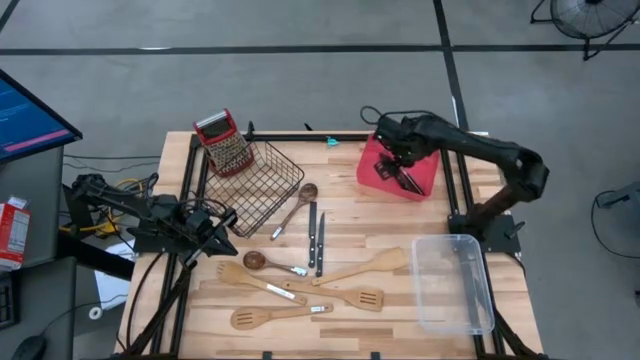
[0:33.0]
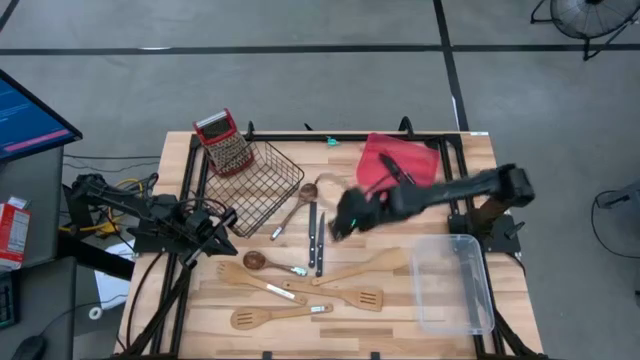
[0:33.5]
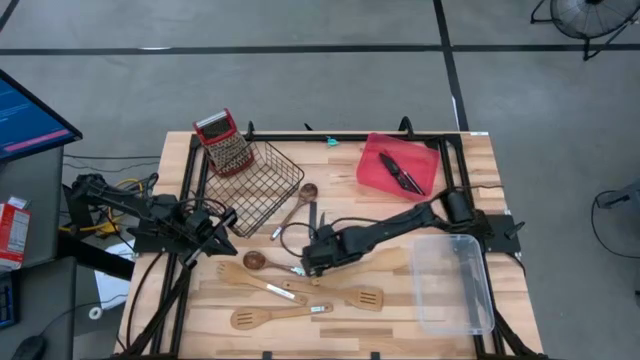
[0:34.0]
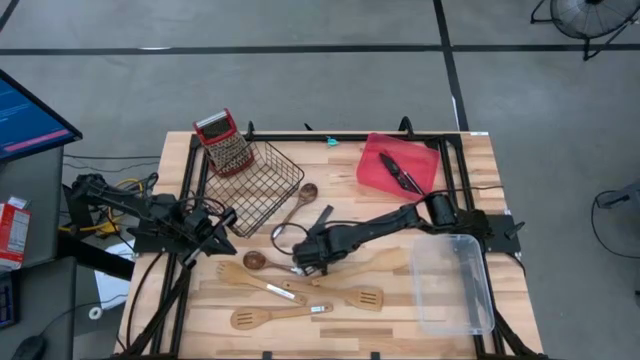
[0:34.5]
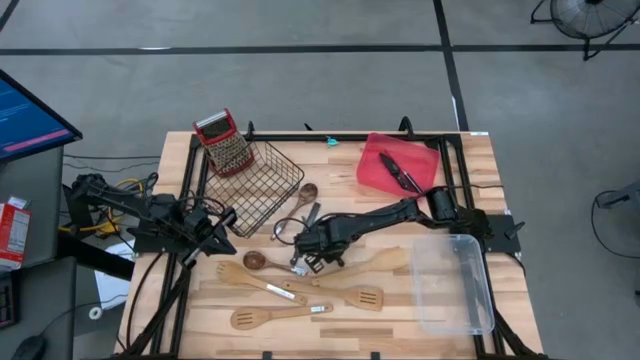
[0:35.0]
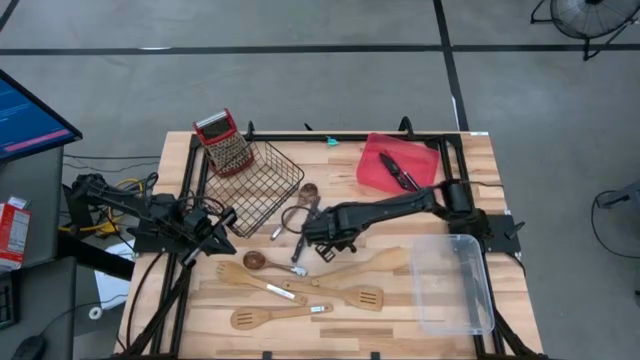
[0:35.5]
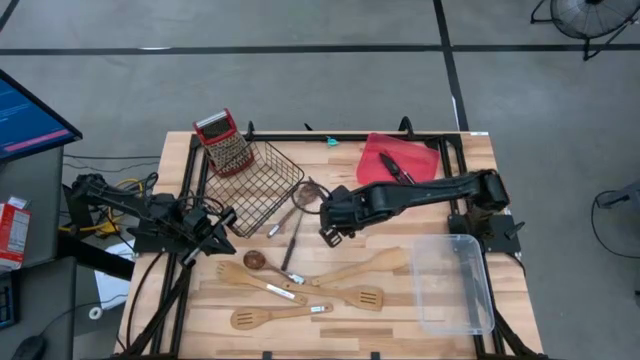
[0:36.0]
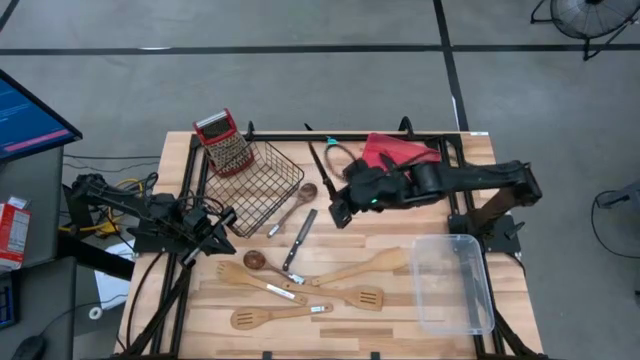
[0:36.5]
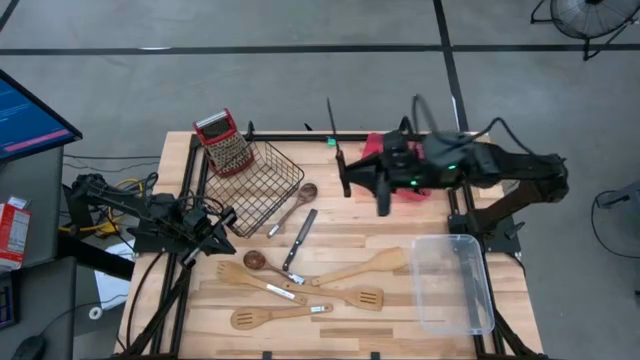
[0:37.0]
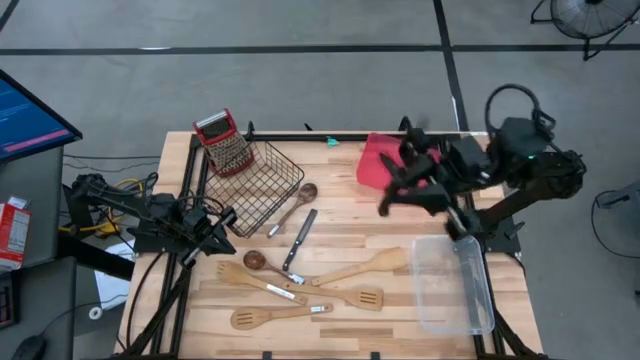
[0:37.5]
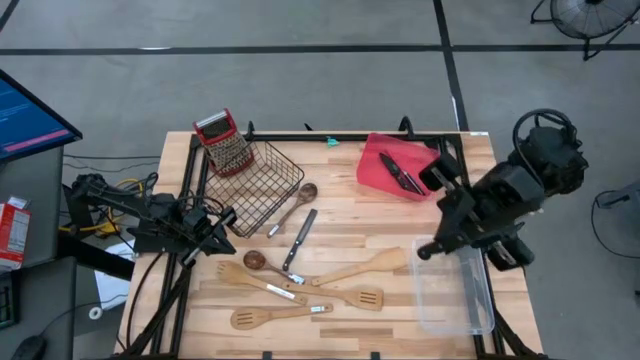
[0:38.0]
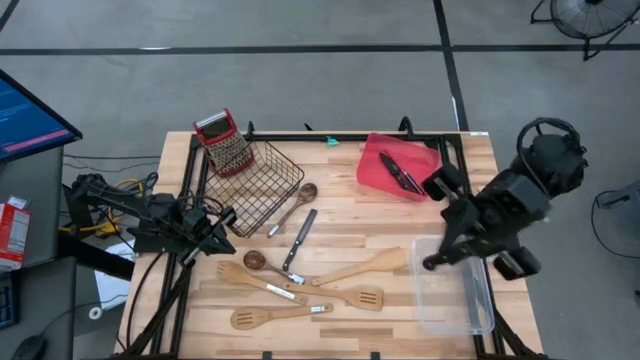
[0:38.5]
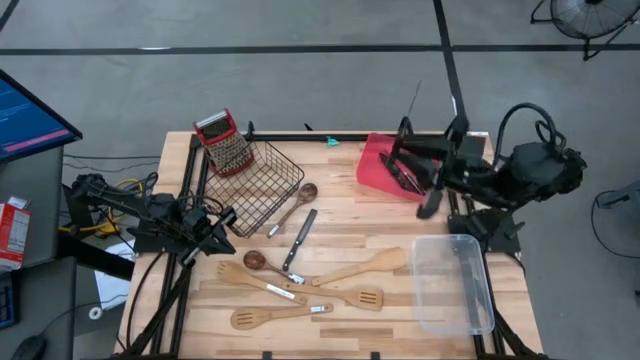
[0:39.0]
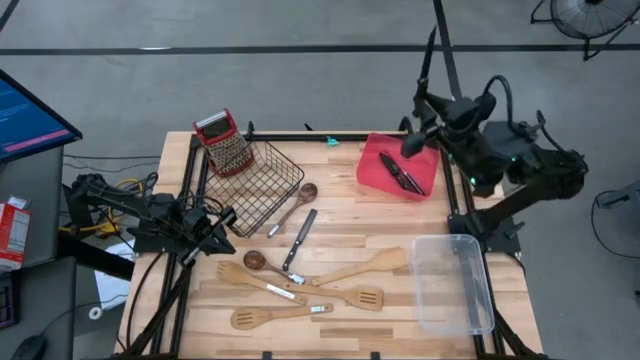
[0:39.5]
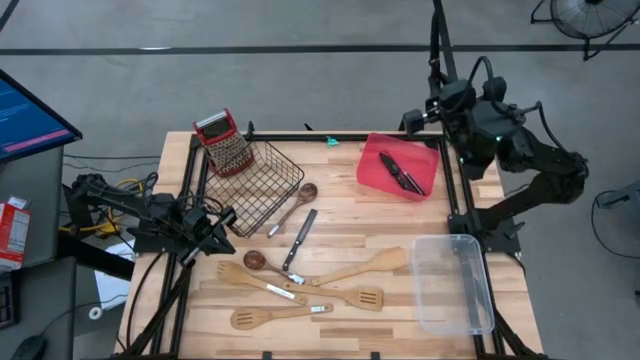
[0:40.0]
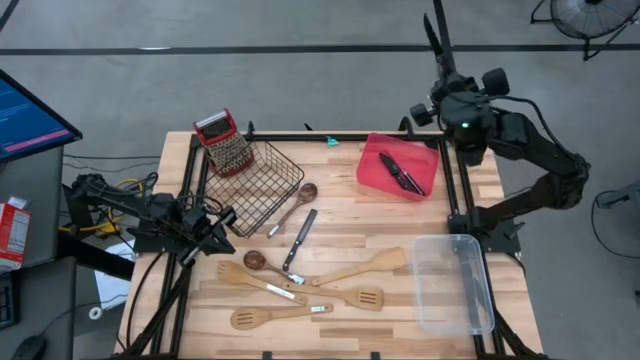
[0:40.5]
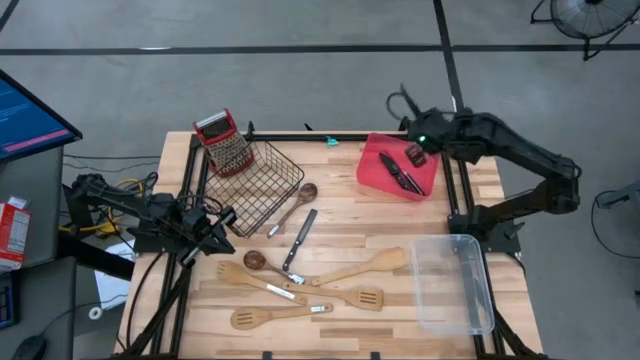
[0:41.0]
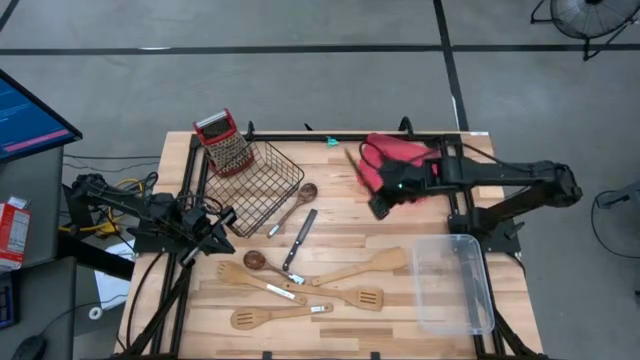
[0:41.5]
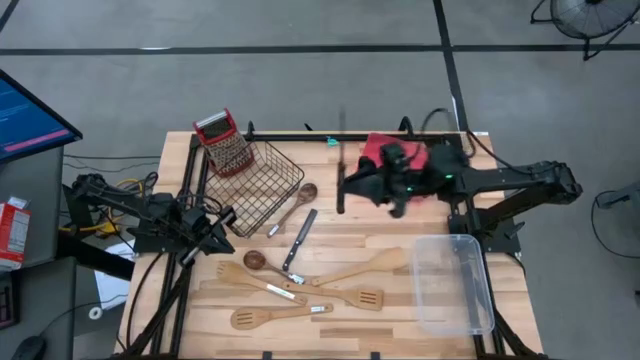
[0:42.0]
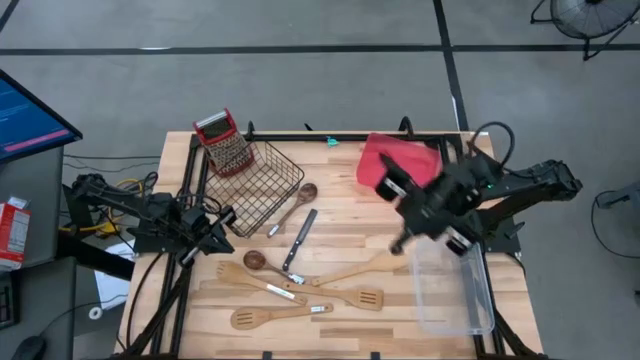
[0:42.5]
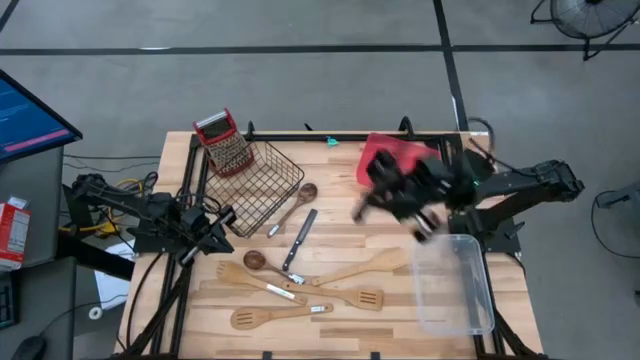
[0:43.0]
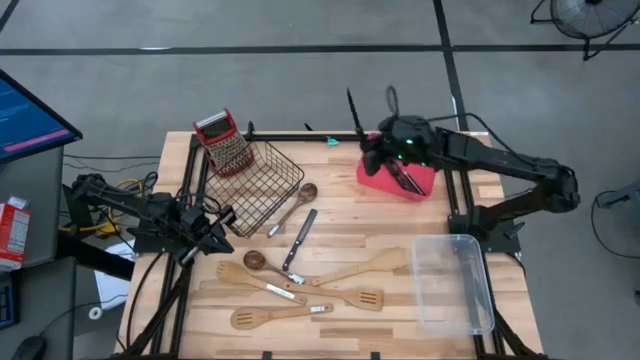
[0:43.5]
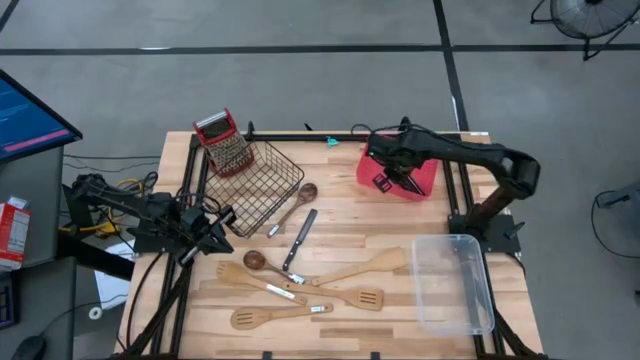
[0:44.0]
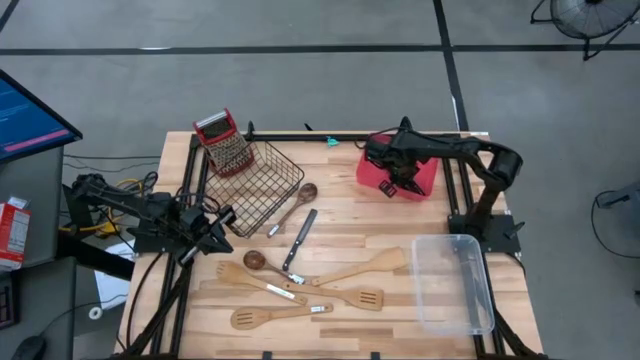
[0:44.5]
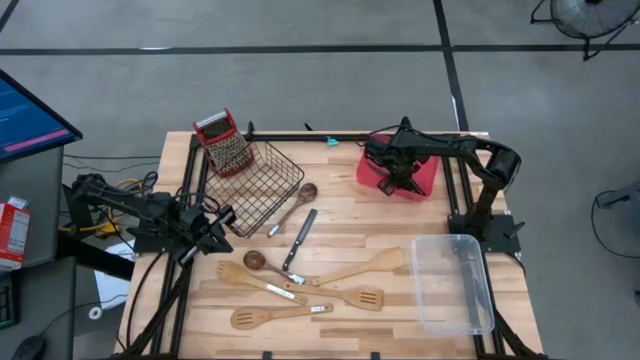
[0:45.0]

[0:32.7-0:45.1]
Task: Pick & Place Kitchen Items
Put the right black knife into the red bin

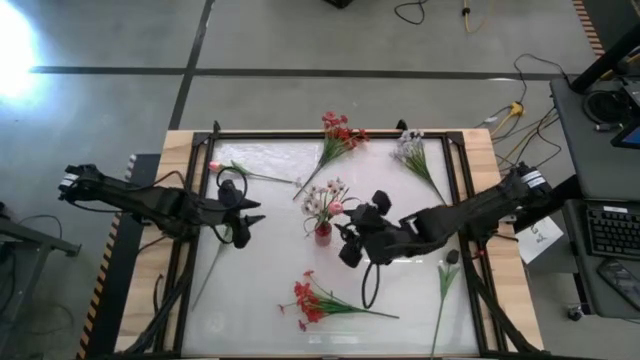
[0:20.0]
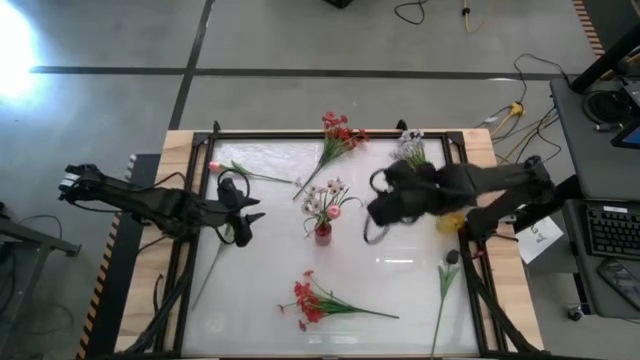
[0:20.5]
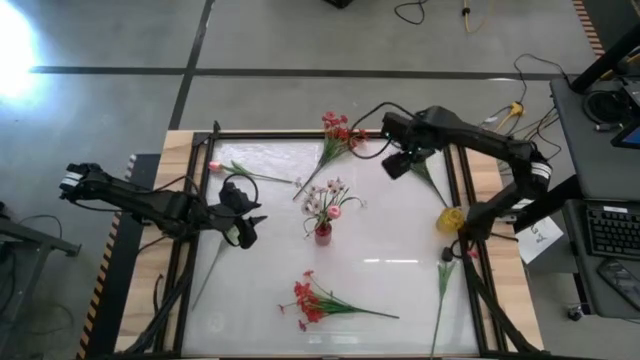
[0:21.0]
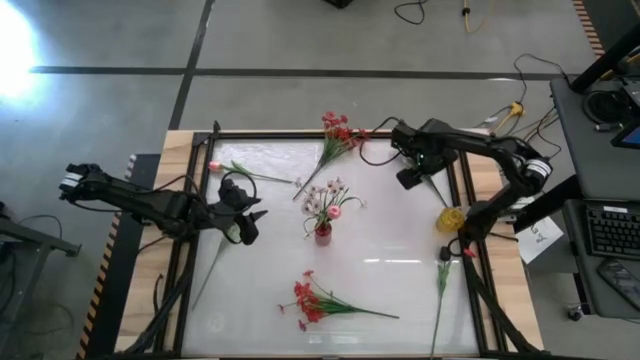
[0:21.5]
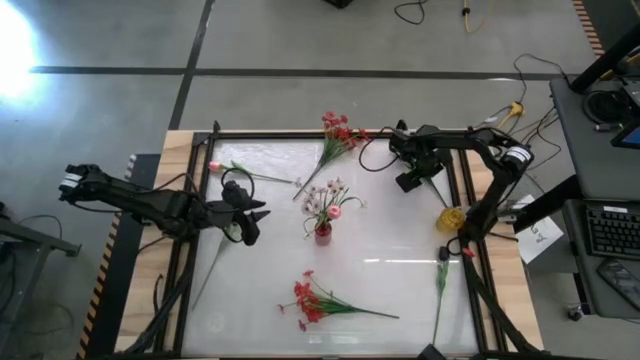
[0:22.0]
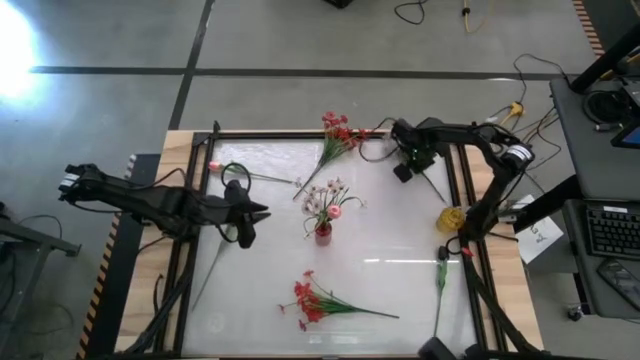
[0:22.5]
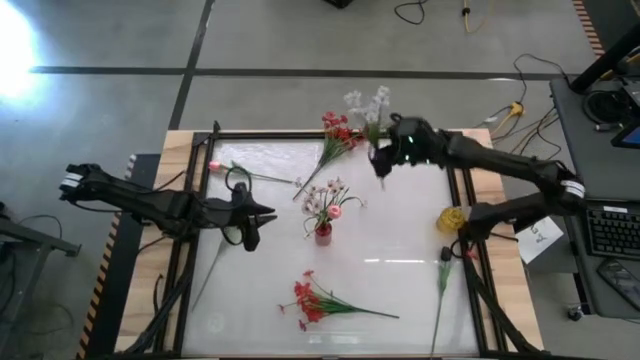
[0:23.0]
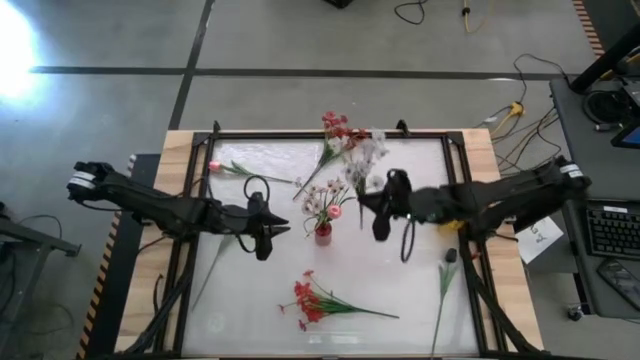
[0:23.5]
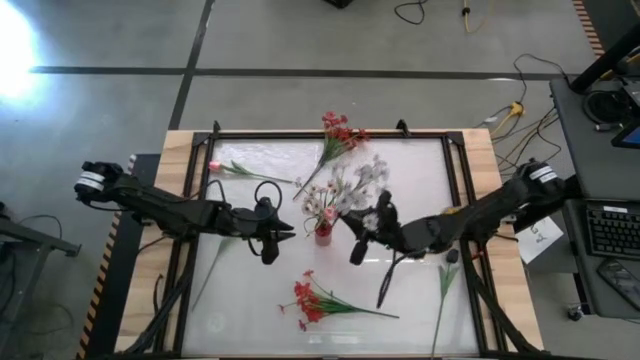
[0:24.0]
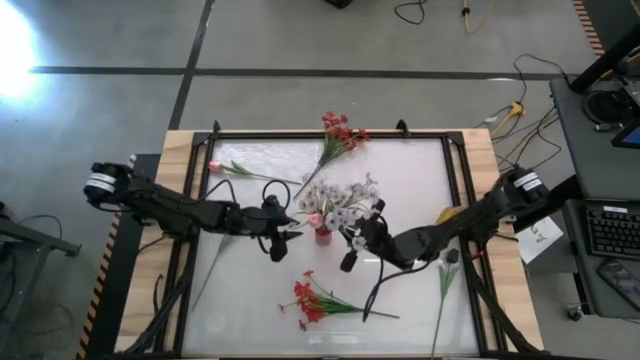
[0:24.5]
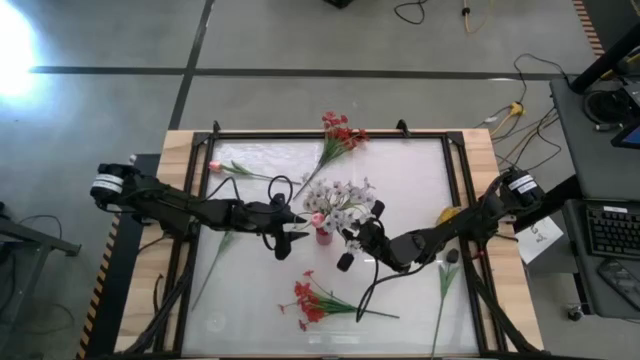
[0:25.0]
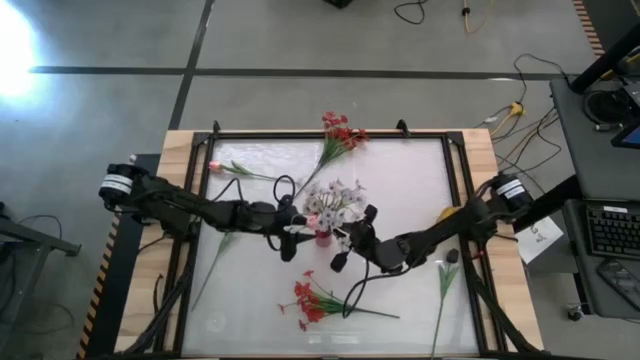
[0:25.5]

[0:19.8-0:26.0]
Task: Sort flowers into vase by color
Put the white flowers into the red vase

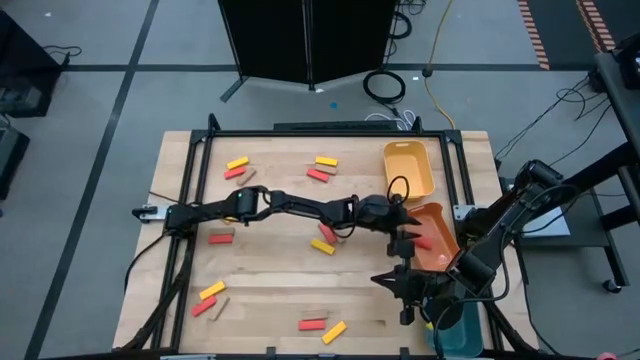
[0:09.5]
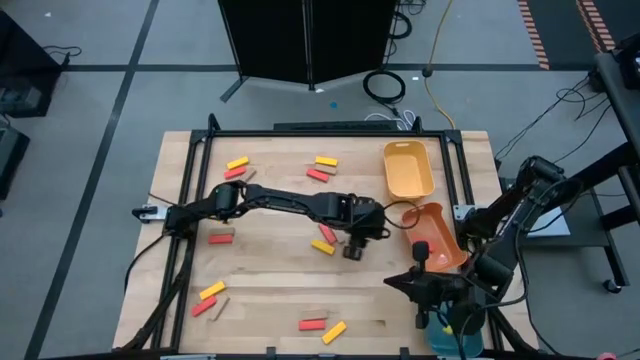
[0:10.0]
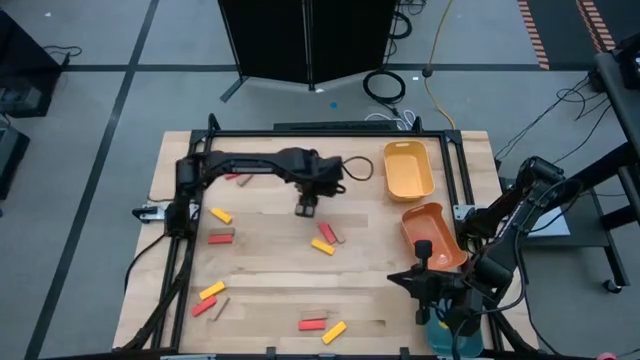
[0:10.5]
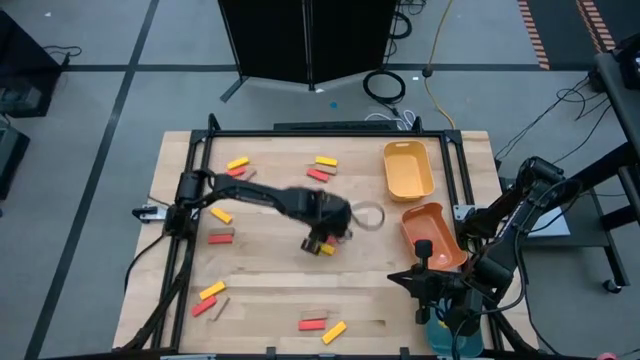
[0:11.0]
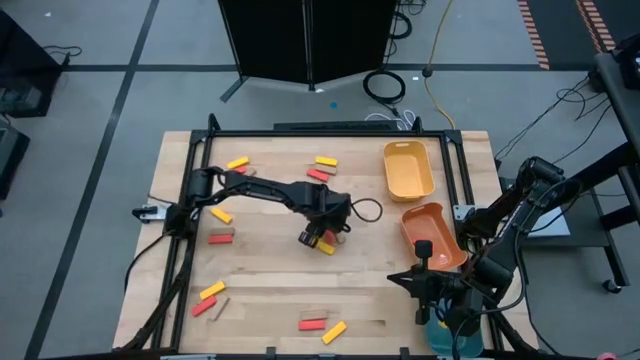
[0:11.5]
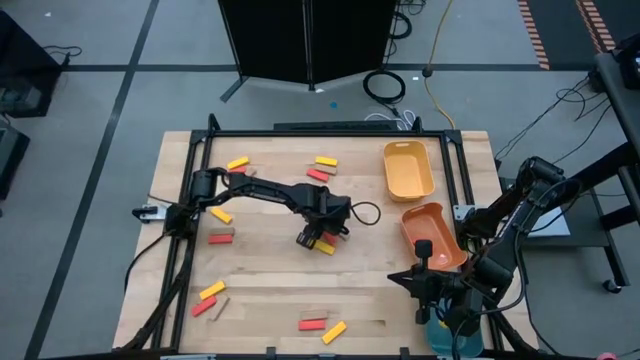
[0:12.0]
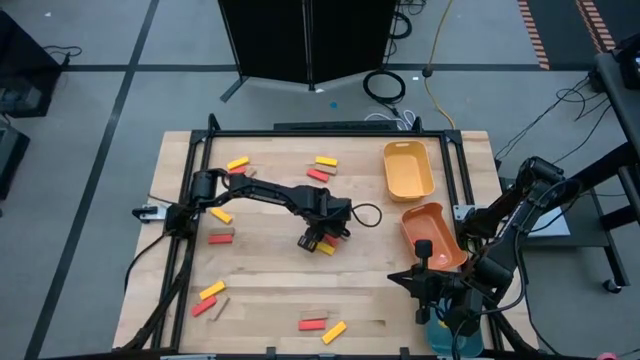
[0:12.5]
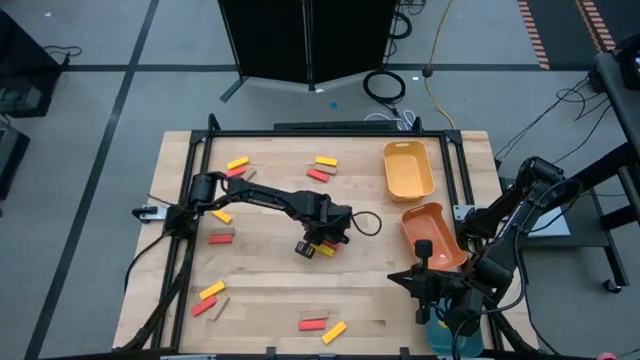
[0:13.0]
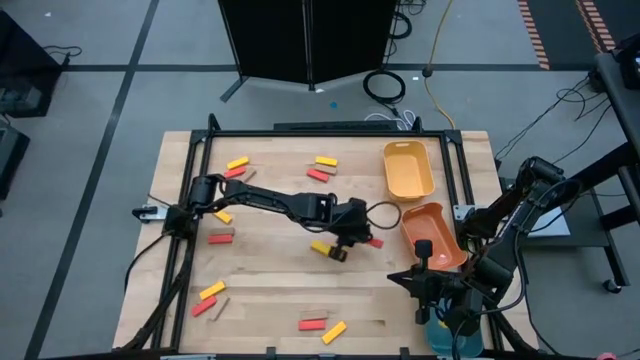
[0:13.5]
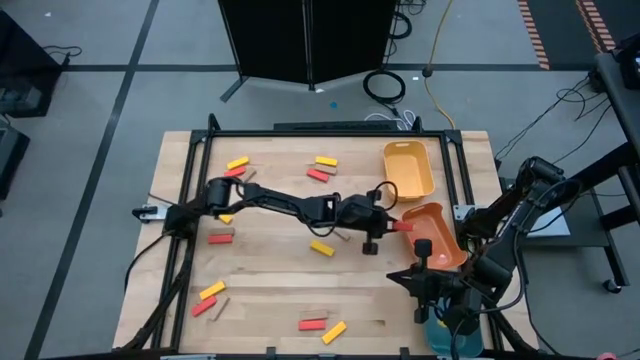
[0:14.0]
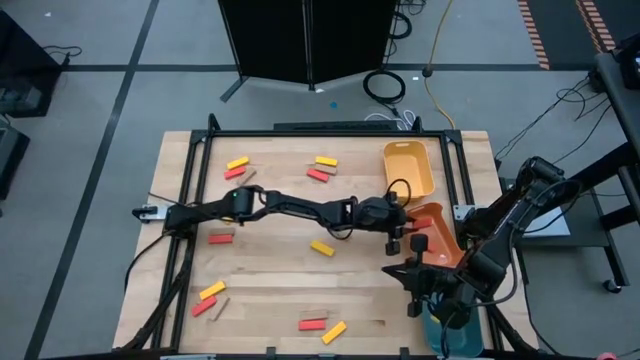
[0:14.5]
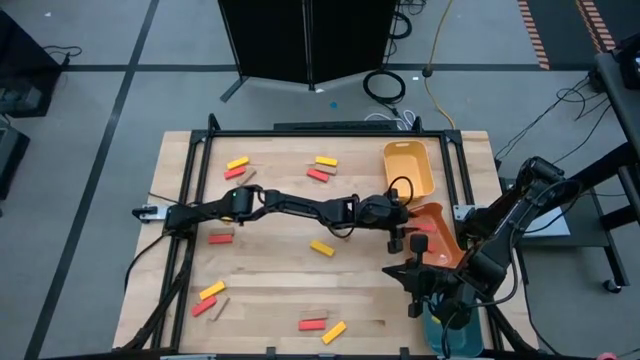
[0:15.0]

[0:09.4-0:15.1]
Task: Sort blocks
Put the red block into the orange bin
